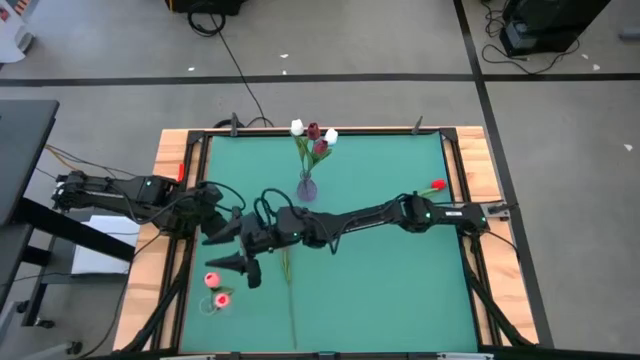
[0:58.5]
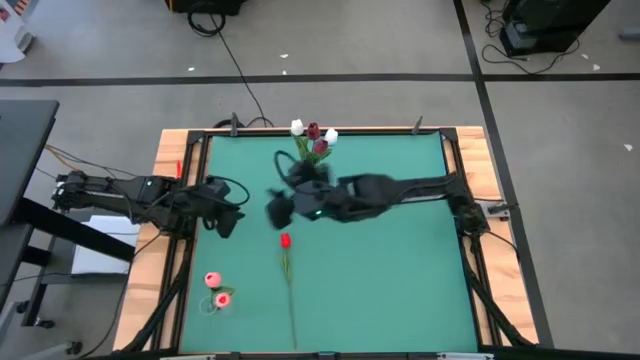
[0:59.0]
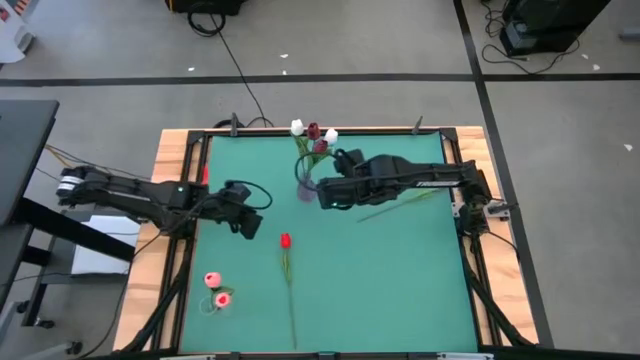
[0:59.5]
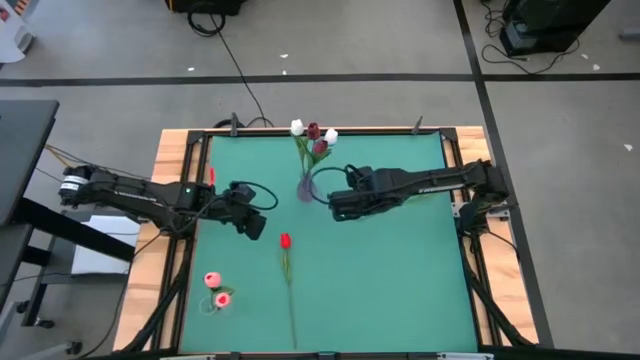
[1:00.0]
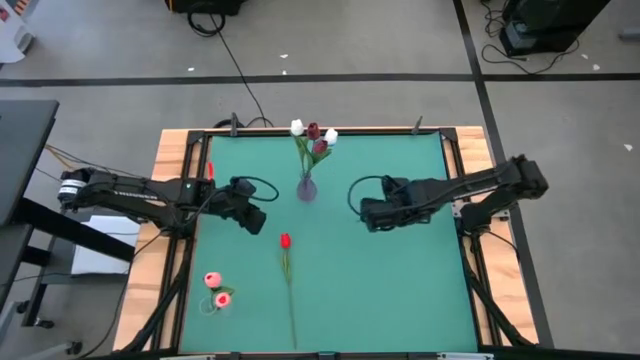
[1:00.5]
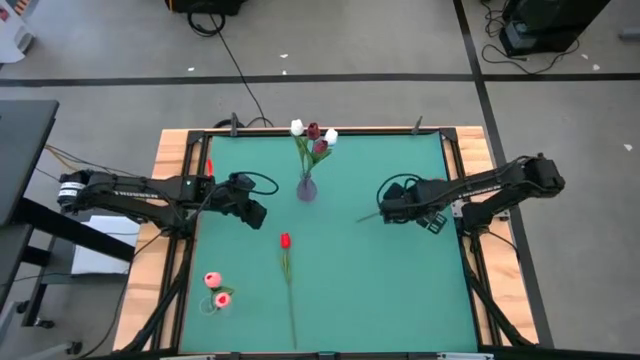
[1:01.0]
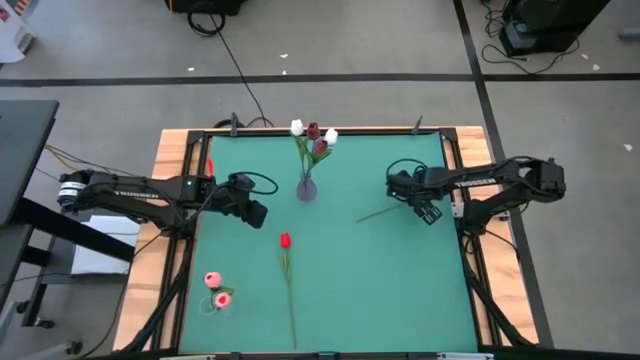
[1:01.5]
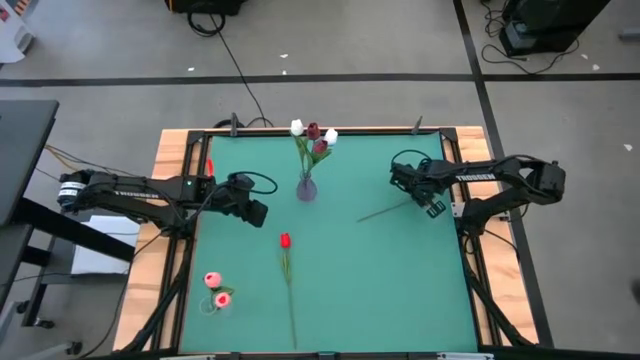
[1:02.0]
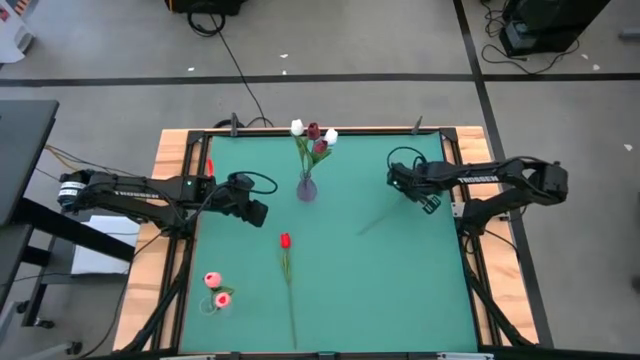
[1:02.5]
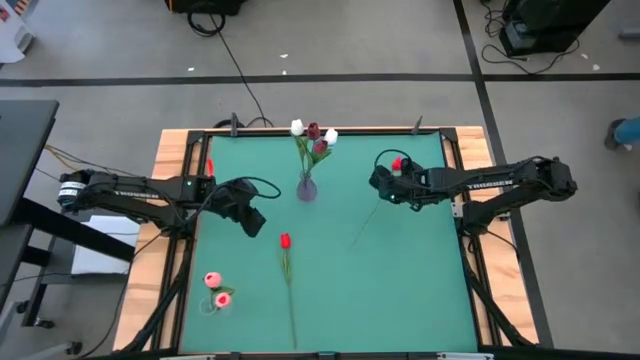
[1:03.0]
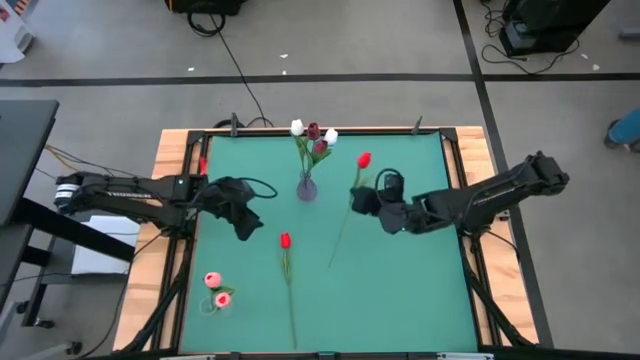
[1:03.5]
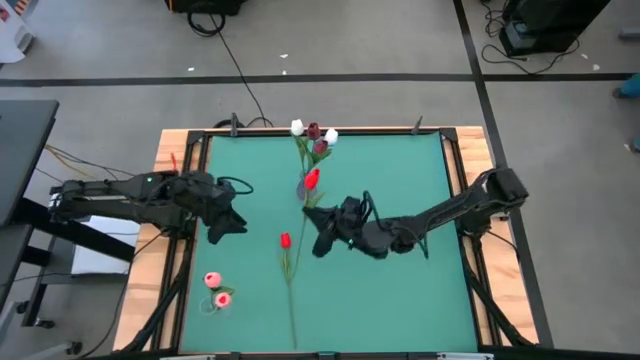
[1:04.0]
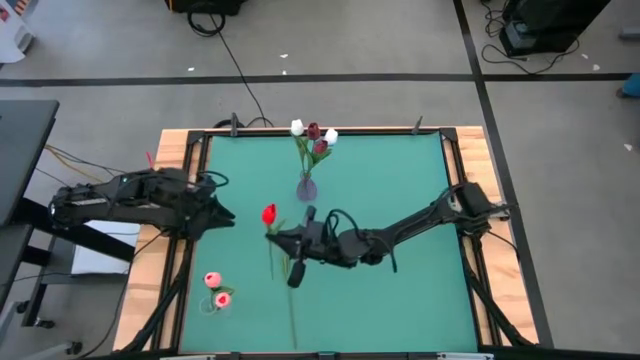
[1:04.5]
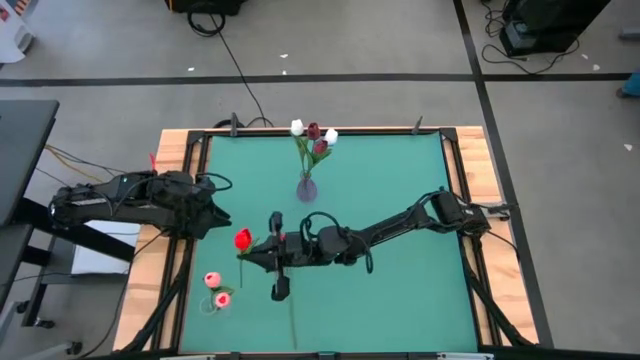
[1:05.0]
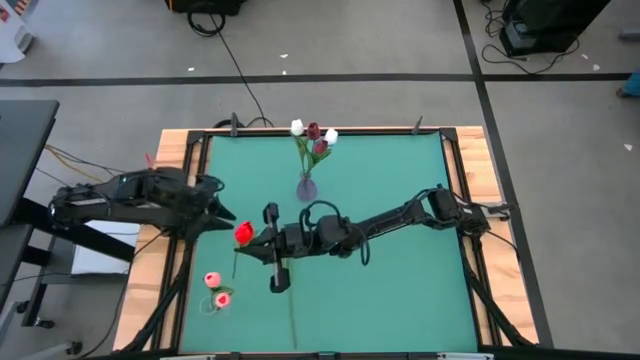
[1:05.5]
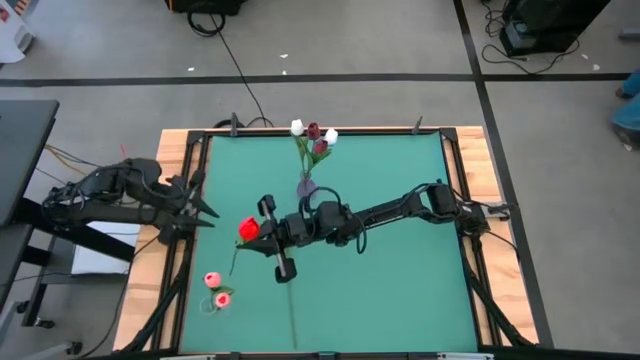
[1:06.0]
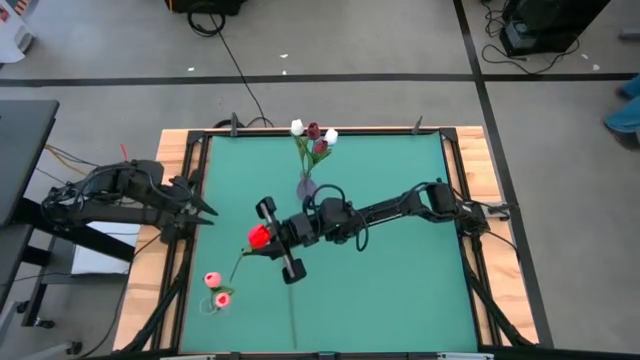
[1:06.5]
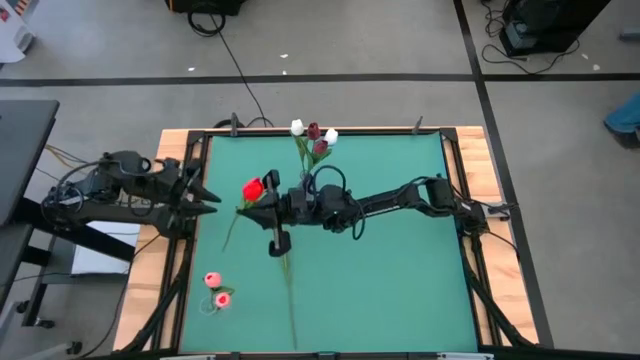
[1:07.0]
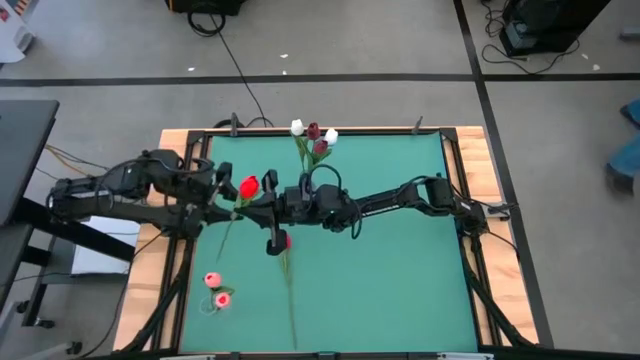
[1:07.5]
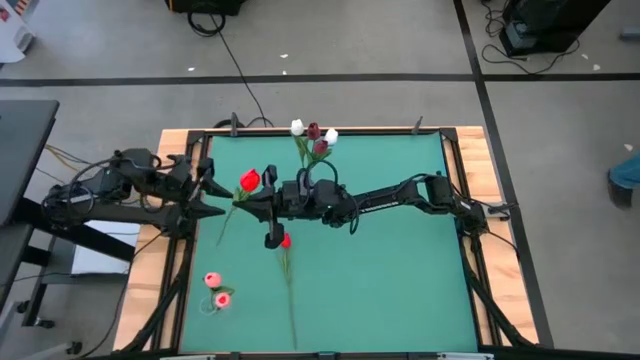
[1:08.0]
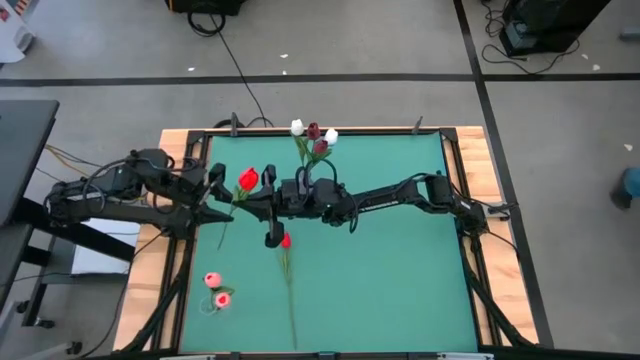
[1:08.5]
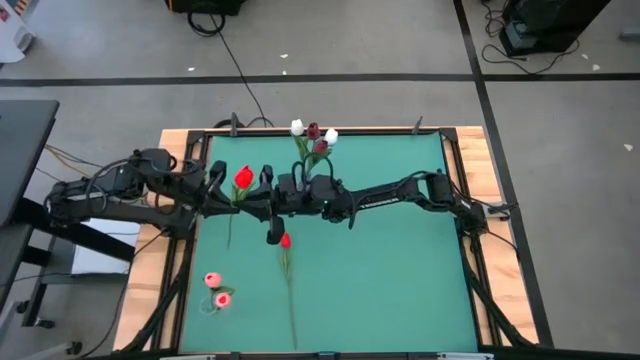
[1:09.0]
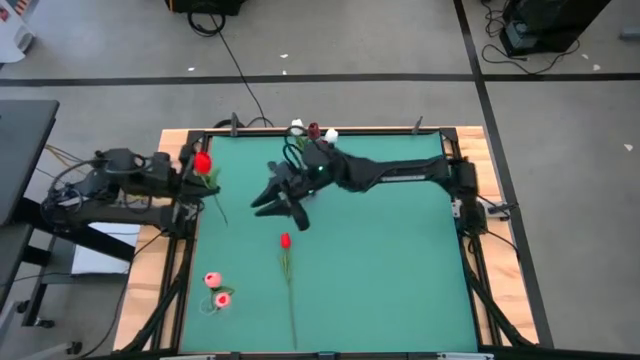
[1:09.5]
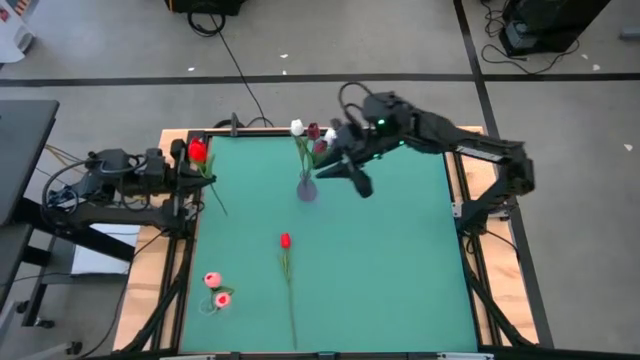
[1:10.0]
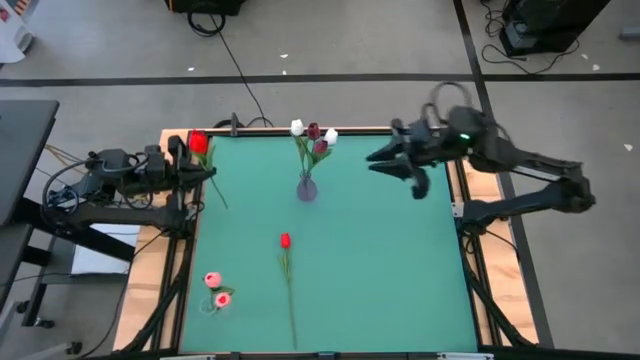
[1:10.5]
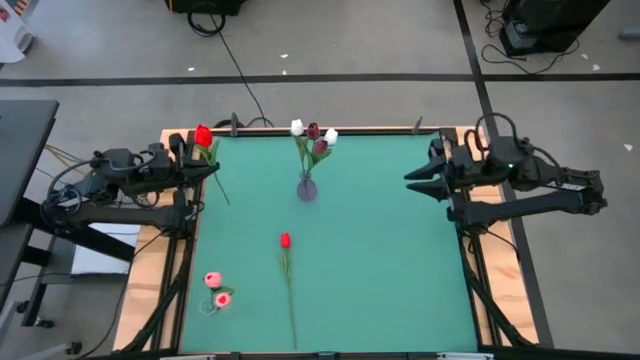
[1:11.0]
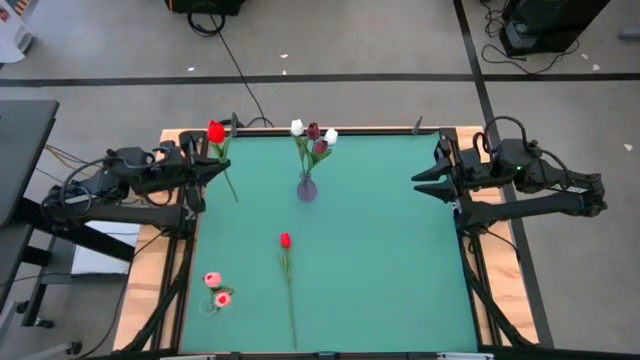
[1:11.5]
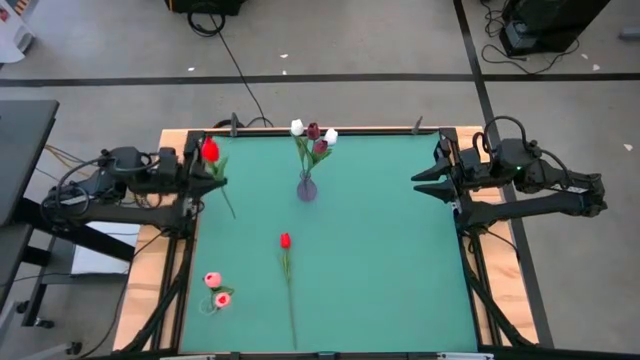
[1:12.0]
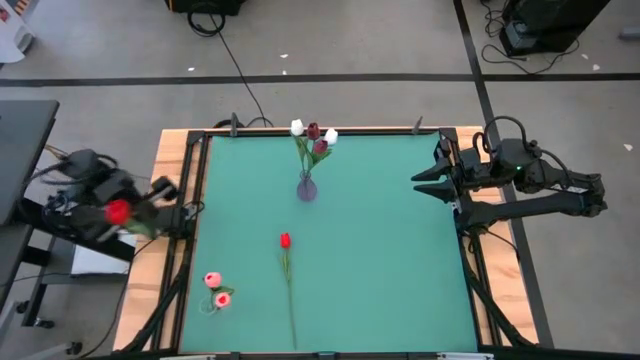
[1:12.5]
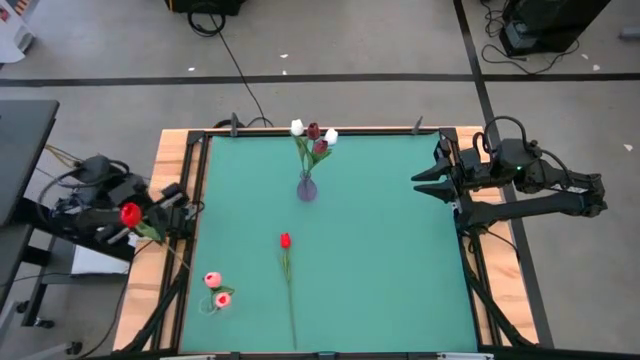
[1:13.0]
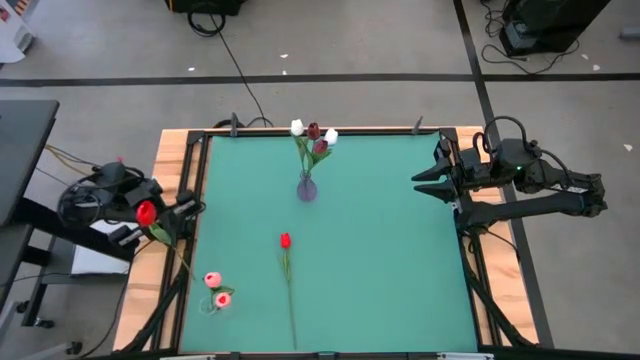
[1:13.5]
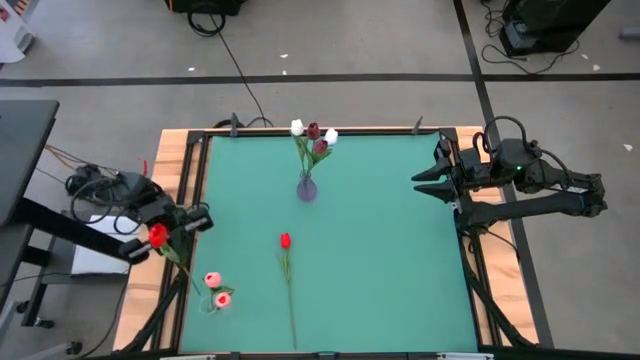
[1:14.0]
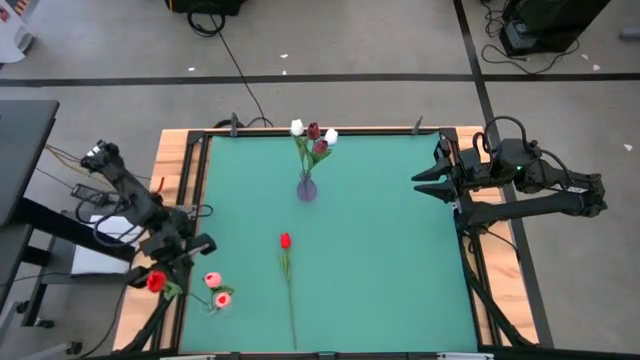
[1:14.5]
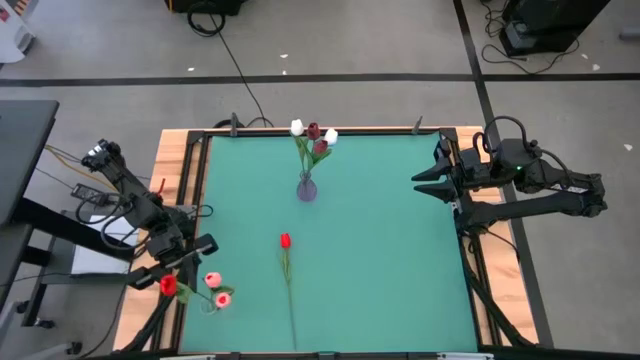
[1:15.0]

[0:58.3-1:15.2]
Task: Sort flowers into vase by color
Put the top red tulip into the transparent vase

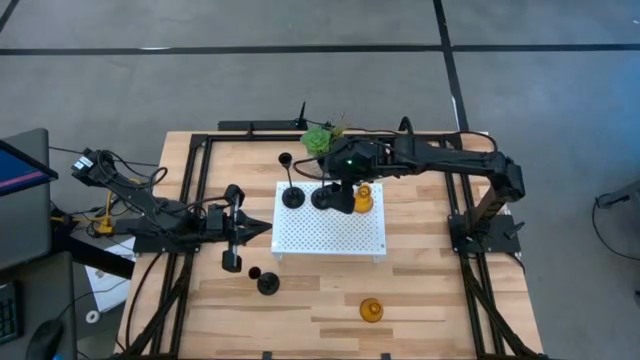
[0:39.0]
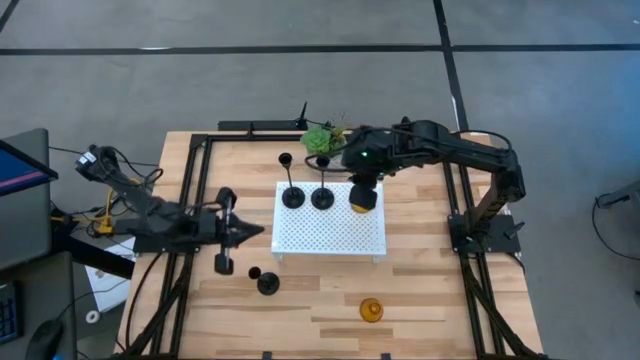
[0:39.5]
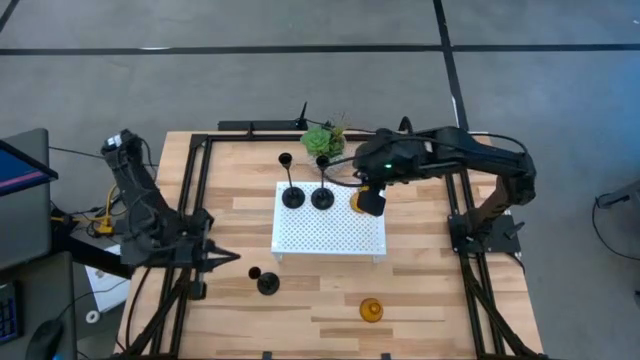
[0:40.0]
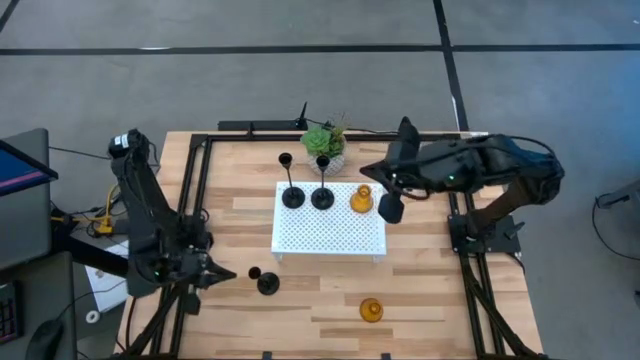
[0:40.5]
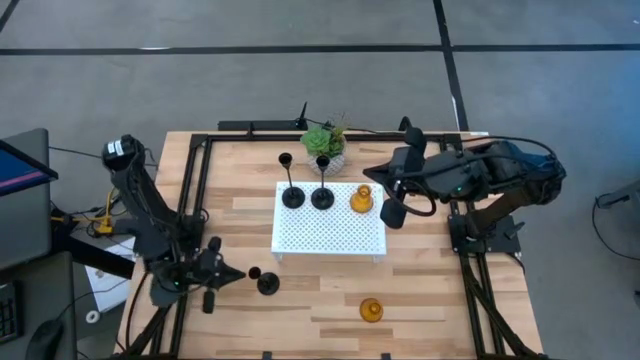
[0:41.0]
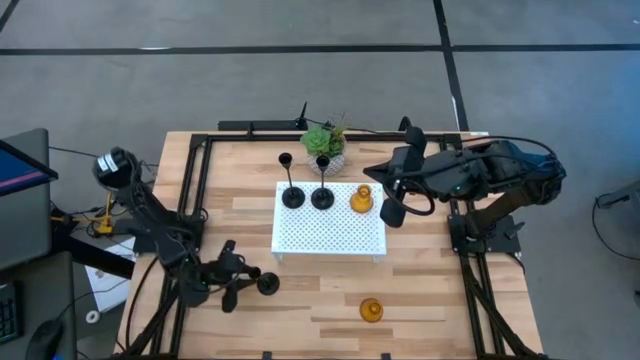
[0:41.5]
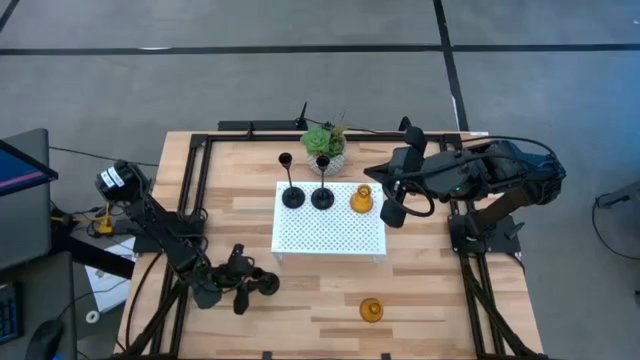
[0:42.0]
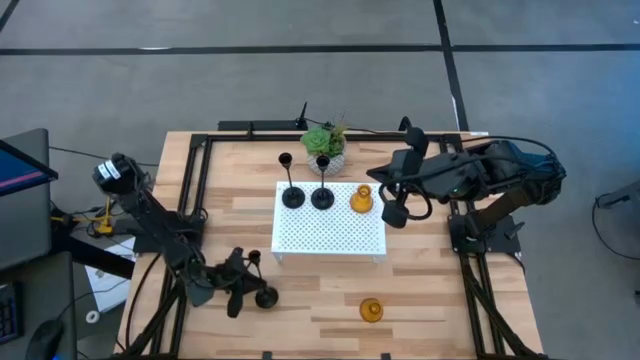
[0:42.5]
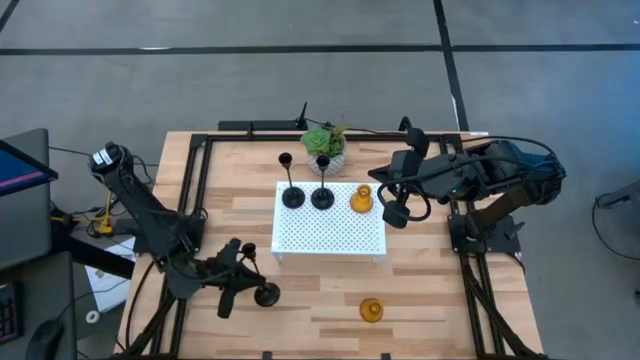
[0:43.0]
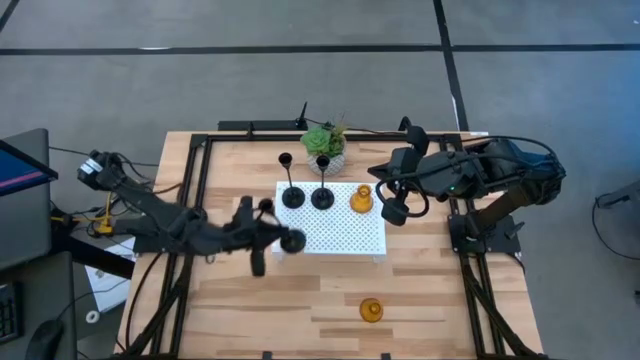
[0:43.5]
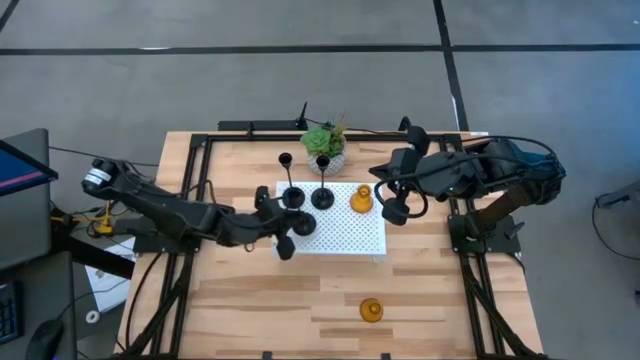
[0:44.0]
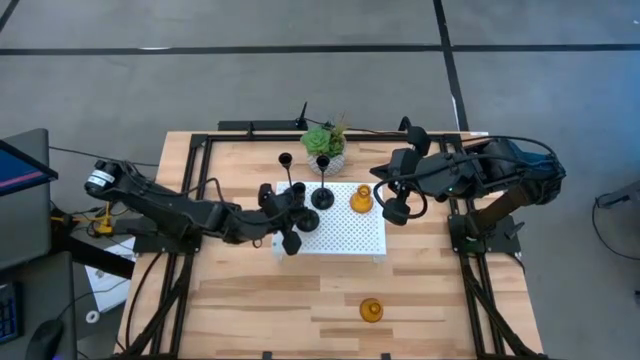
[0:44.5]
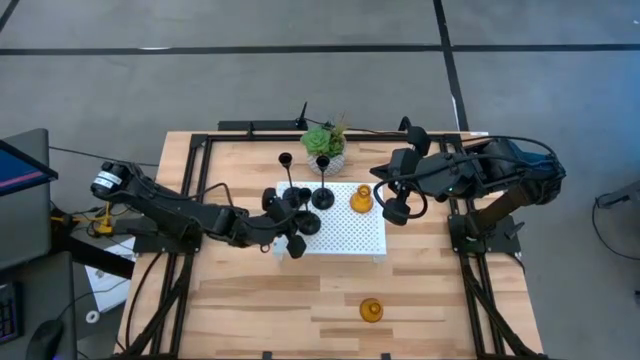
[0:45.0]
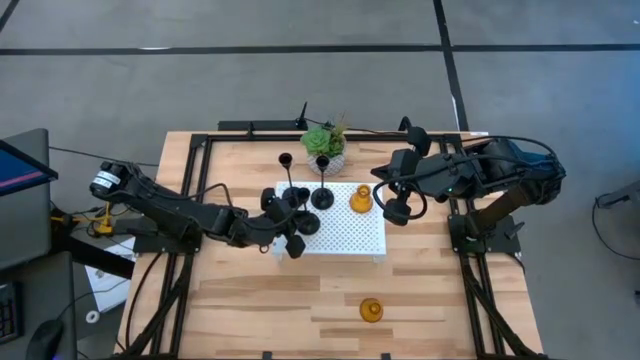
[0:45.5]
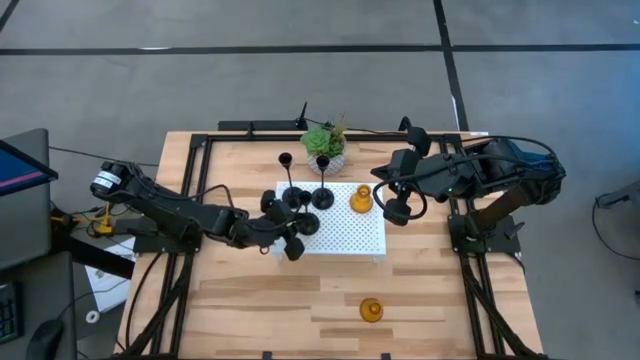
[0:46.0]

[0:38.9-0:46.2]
Task: Pick & Place candle stick holders
Put the black candle holder on the shelf
